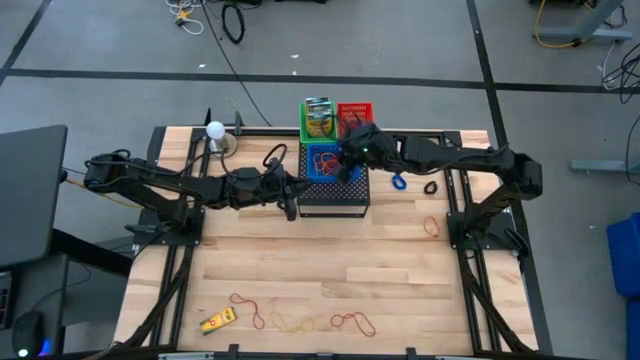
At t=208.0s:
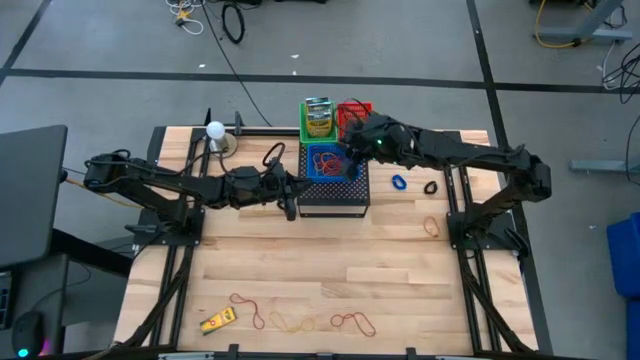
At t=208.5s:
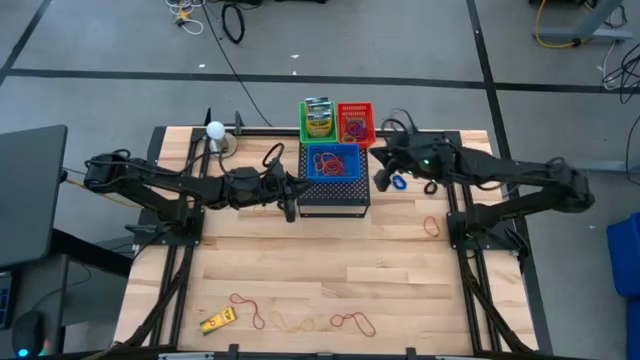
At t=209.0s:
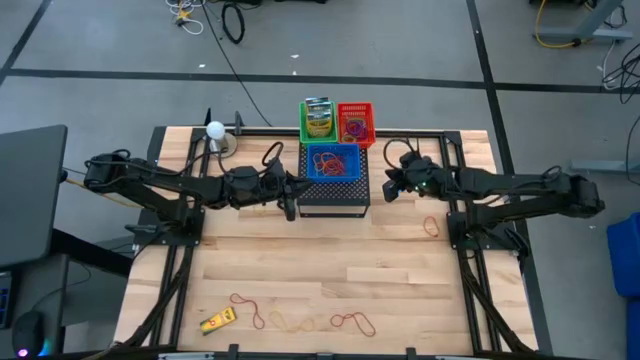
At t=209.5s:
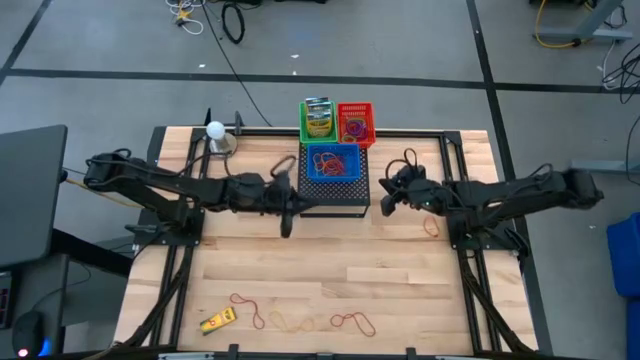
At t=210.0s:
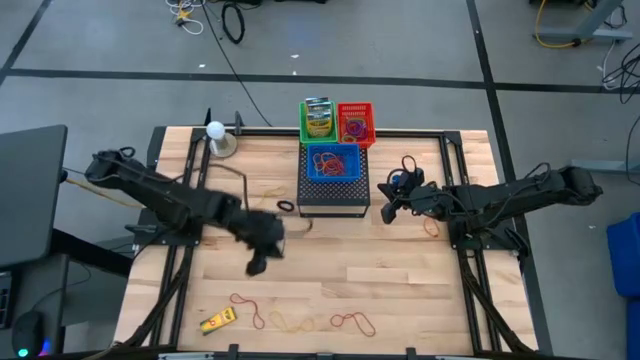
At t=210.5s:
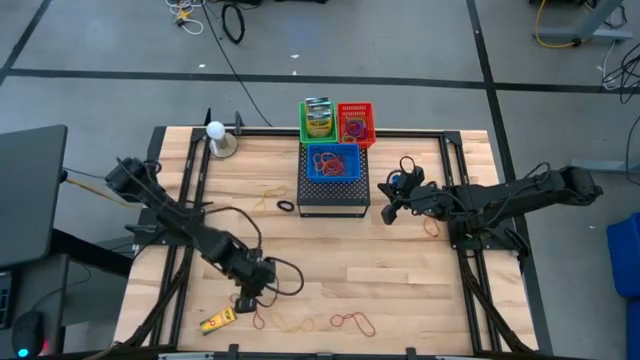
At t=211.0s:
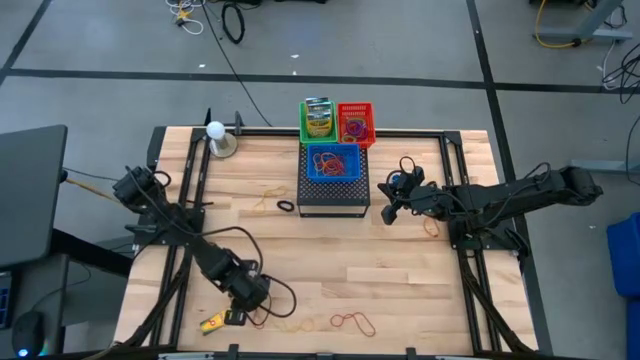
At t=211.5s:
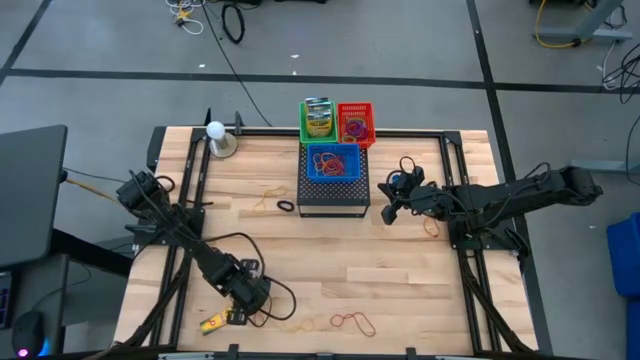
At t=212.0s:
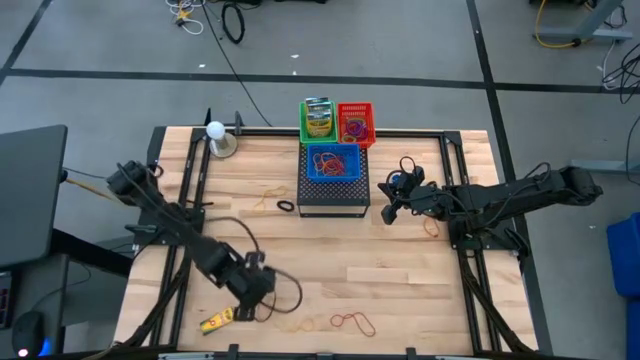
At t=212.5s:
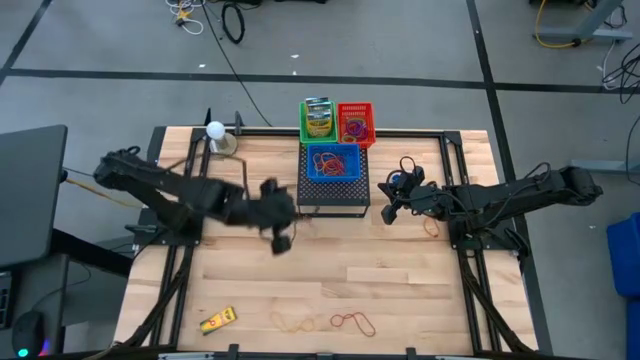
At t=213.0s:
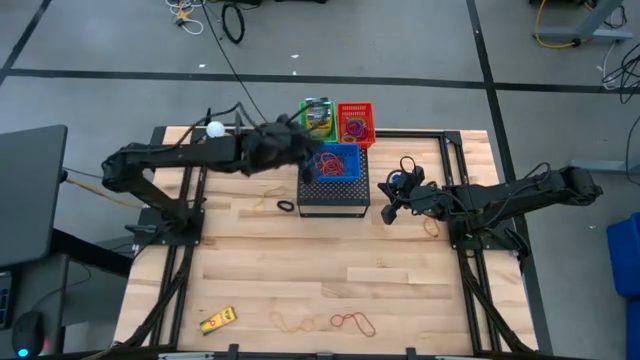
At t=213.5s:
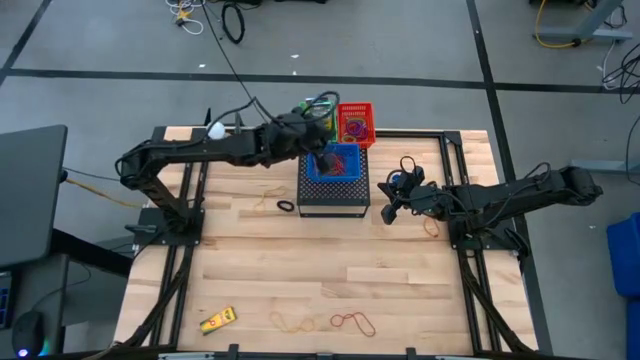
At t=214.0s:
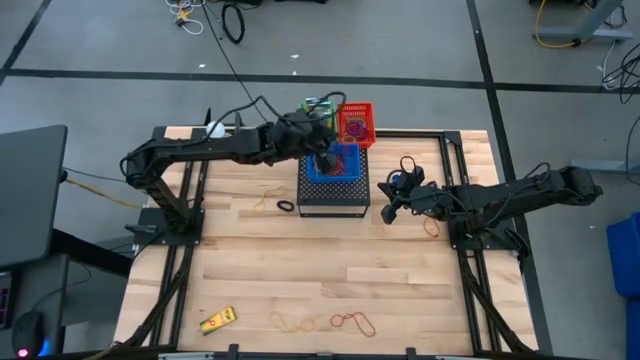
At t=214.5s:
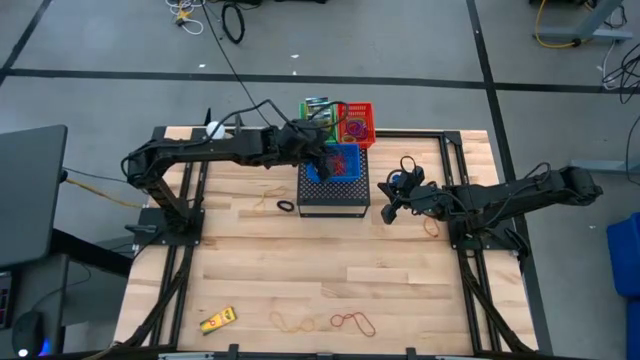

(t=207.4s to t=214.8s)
Task: Pick & Place Office Desk Supplies
Put the red rubber band into the blue bin on the shelf

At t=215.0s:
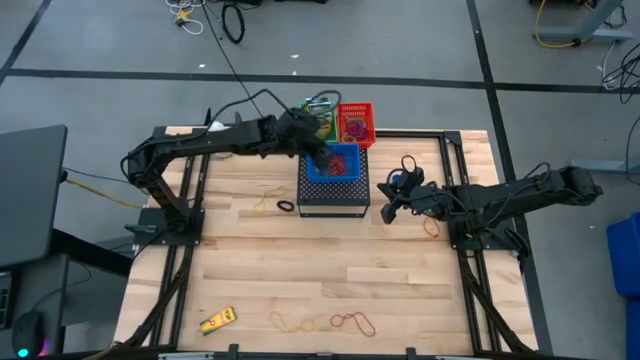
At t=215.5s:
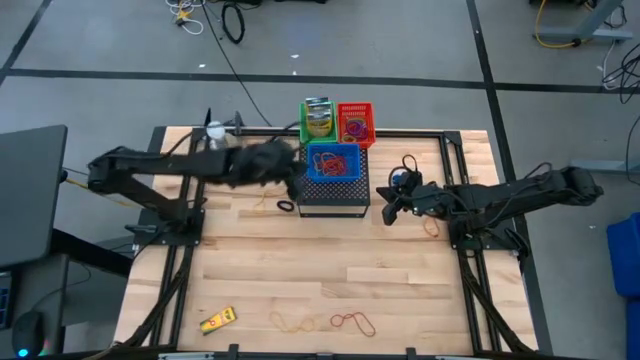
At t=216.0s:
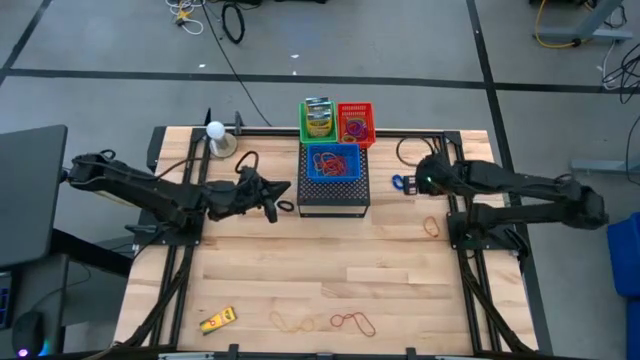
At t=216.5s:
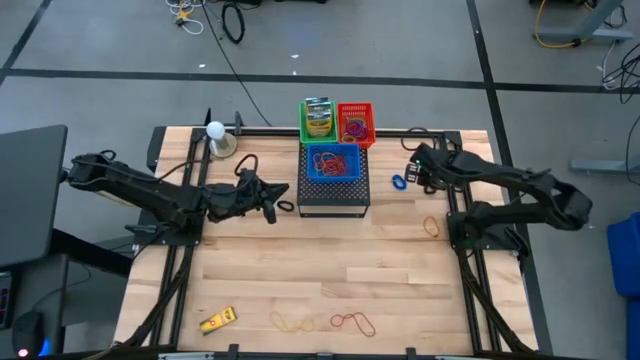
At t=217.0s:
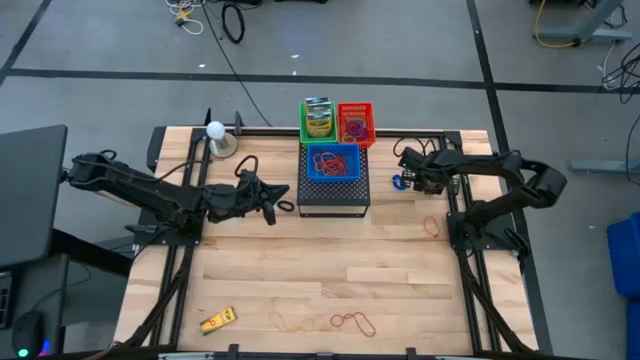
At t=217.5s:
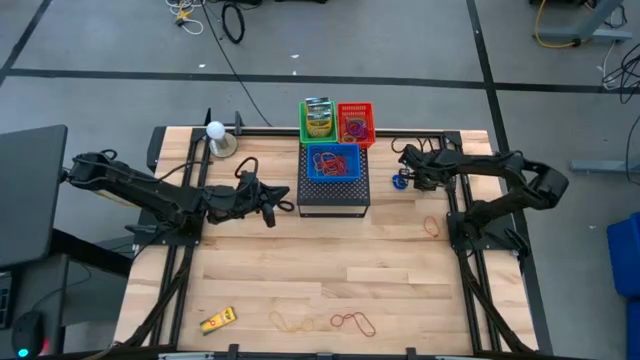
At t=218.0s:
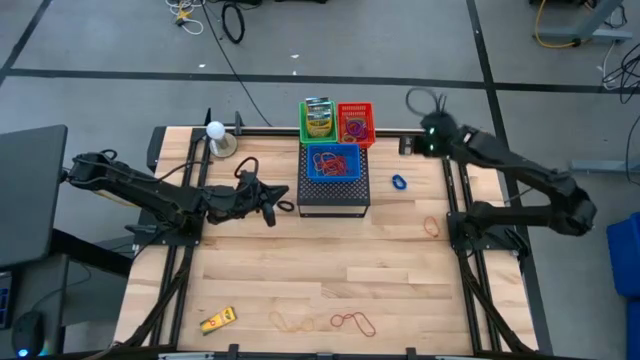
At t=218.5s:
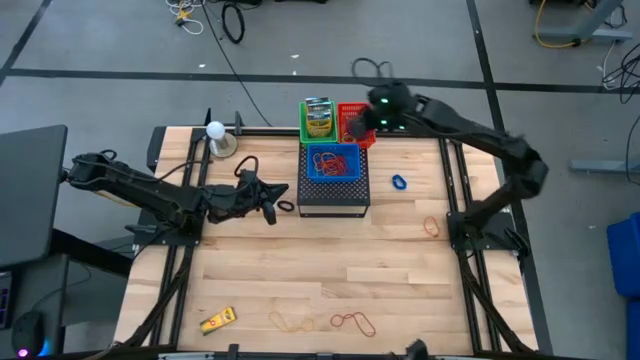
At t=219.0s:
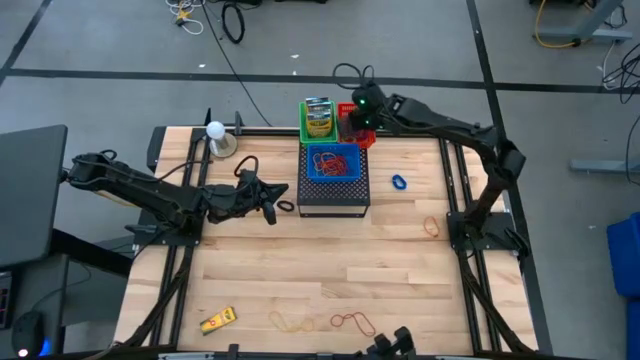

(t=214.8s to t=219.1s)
Put the black spring keychain into the red bin on the shelf

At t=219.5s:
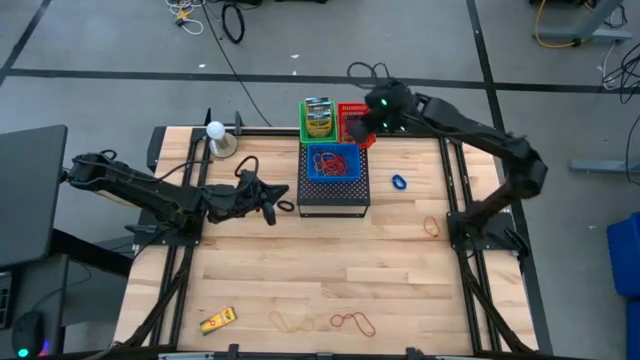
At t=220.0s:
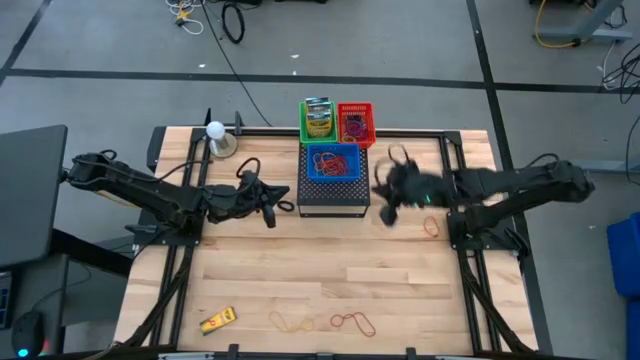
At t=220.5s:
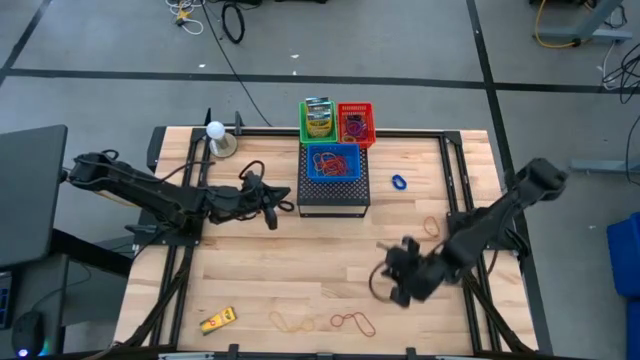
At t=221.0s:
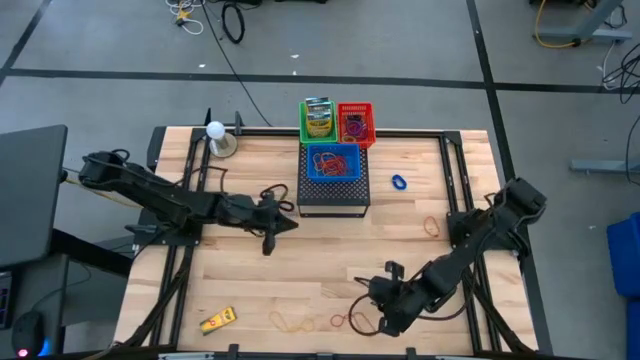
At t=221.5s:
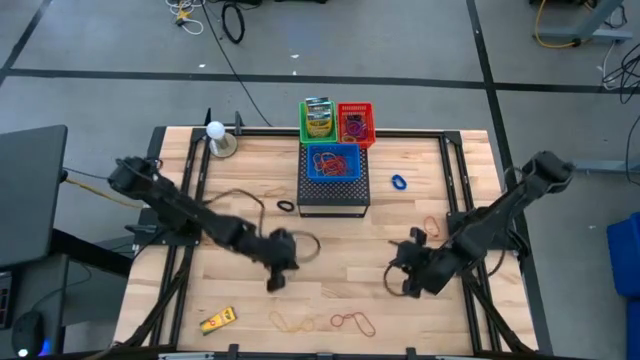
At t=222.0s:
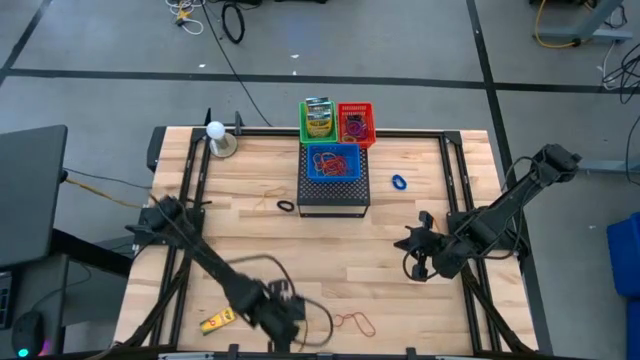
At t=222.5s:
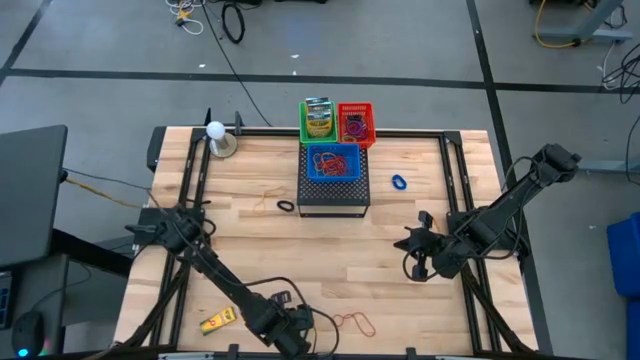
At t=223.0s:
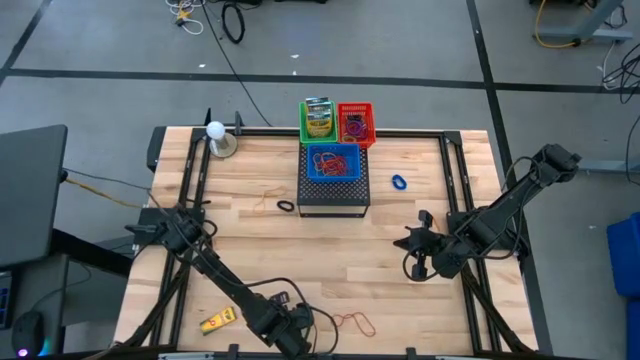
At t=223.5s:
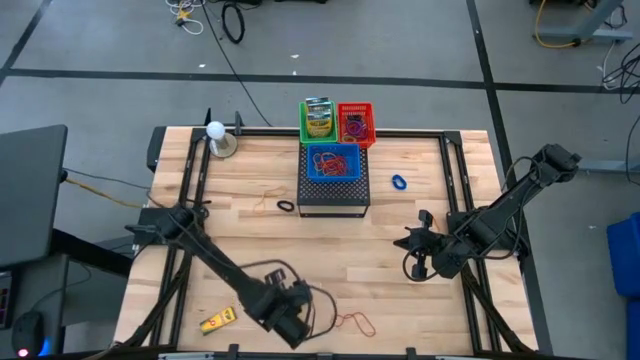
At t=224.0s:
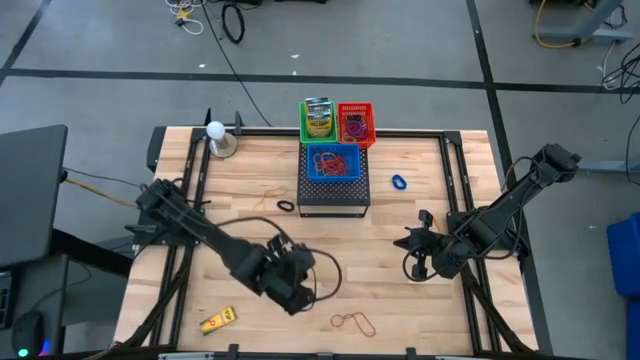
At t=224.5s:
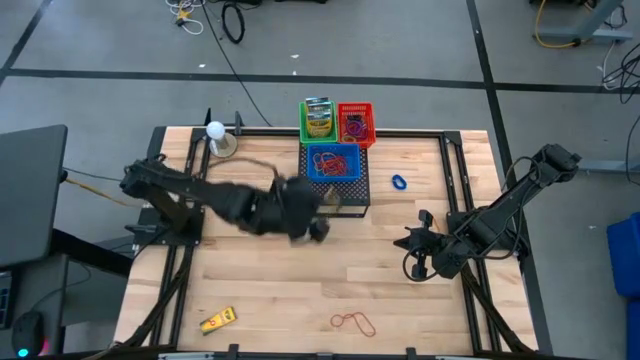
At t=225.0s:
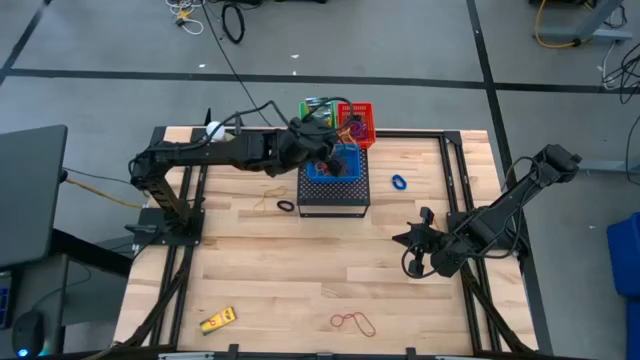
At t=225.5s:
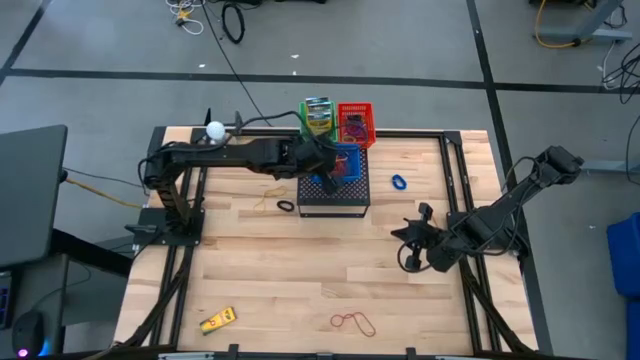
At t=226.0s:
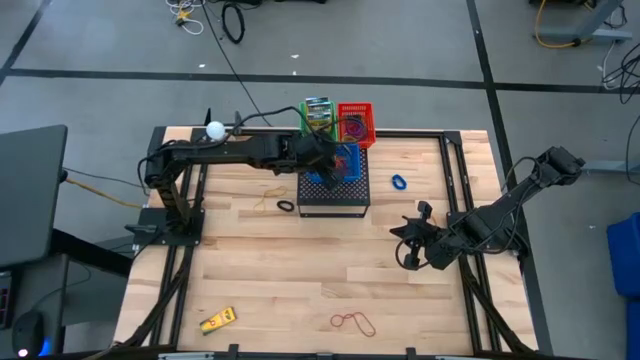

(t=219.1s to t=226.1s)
Put the yellow rubber band into the blue bin on the shelf

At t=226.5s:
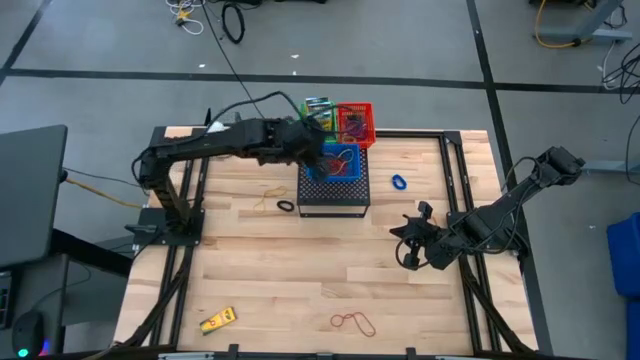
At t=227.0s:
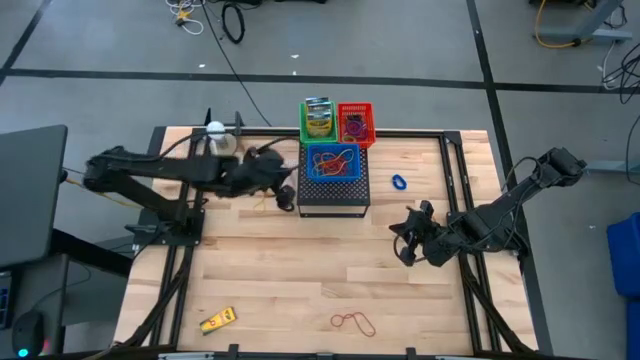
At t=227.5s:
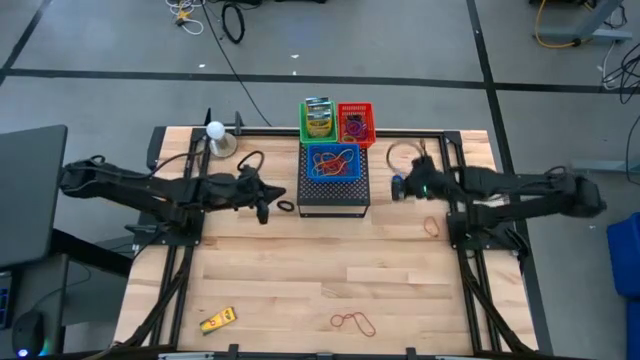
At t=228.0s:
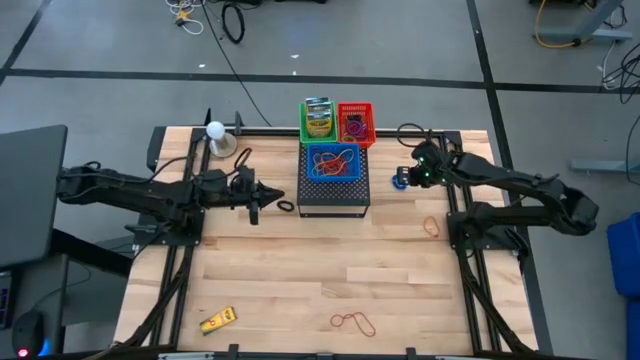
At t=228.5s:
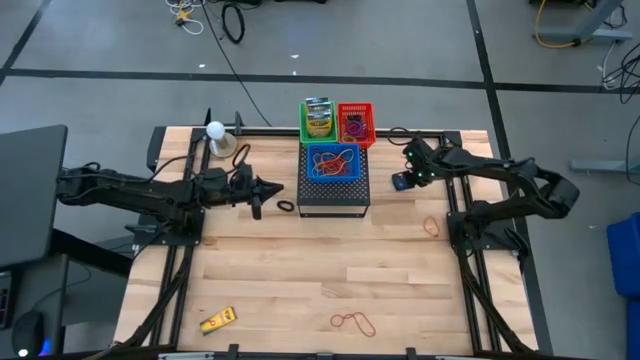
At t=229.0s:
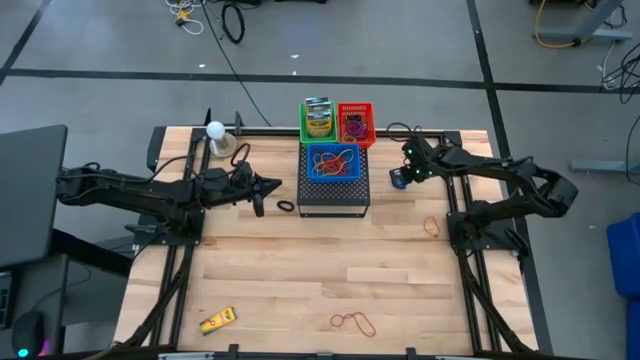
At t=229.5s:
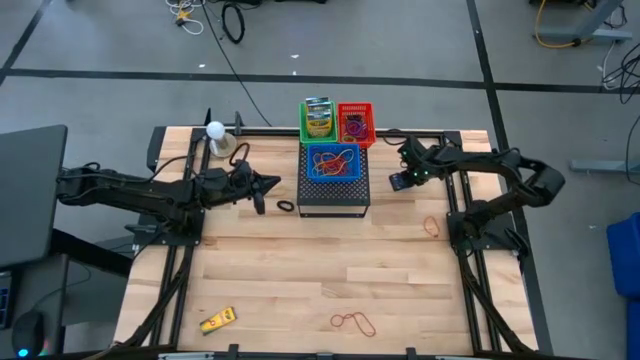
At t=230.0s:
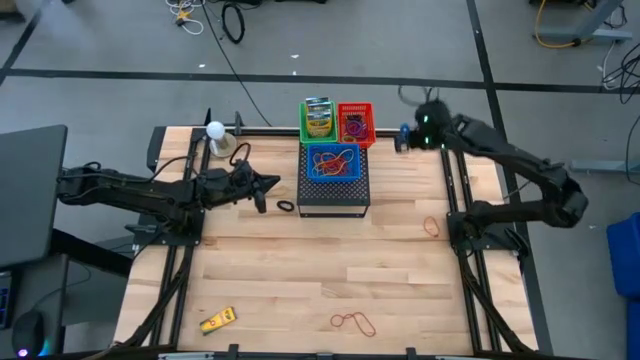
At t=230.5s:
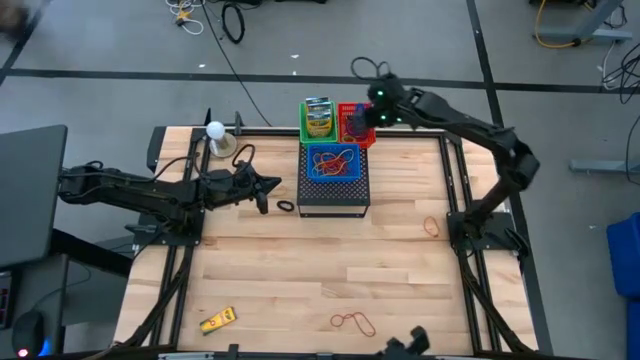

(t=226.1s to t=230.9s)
Put the blue spring keychain into the red bin on the shelf
